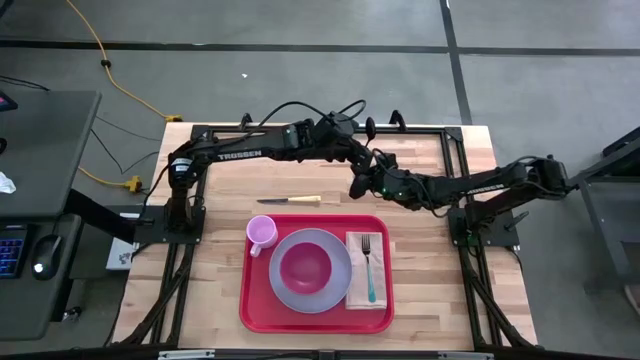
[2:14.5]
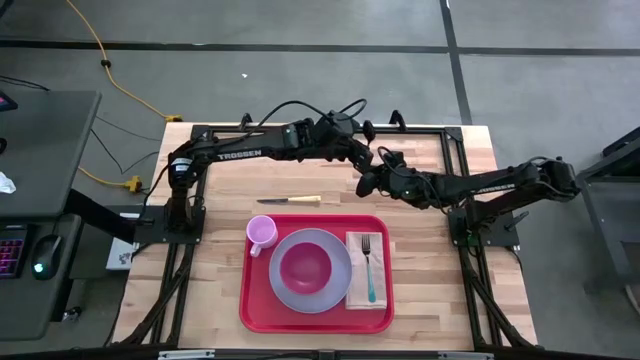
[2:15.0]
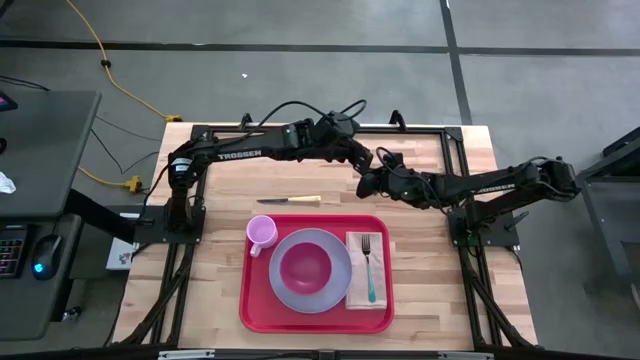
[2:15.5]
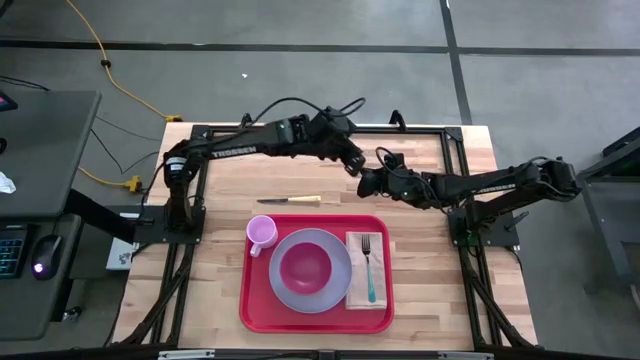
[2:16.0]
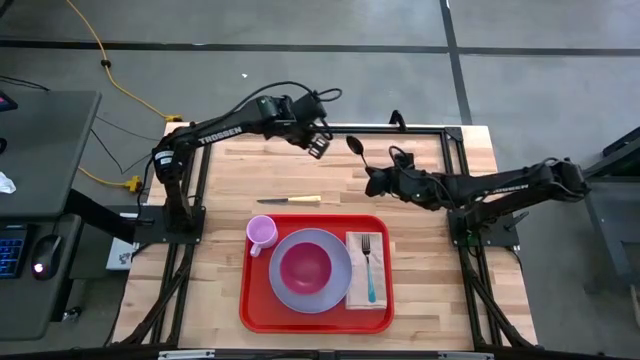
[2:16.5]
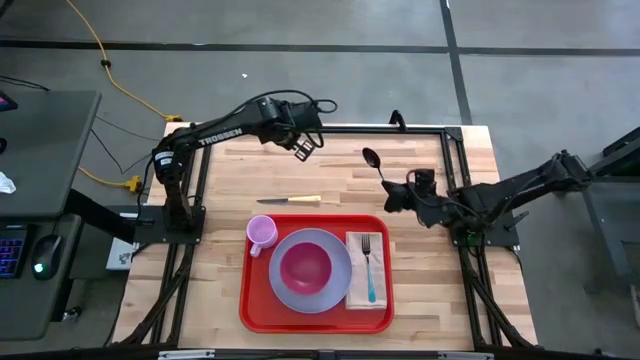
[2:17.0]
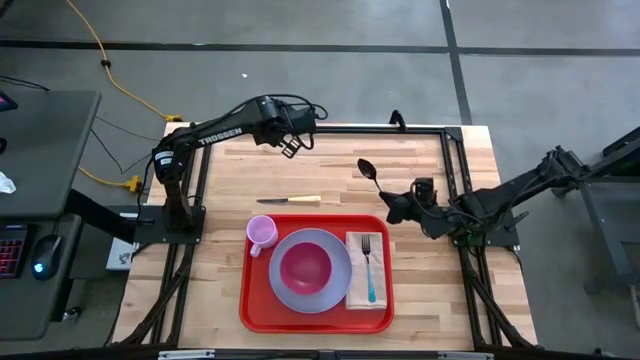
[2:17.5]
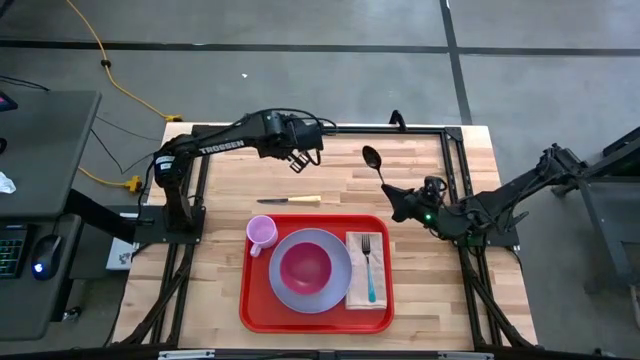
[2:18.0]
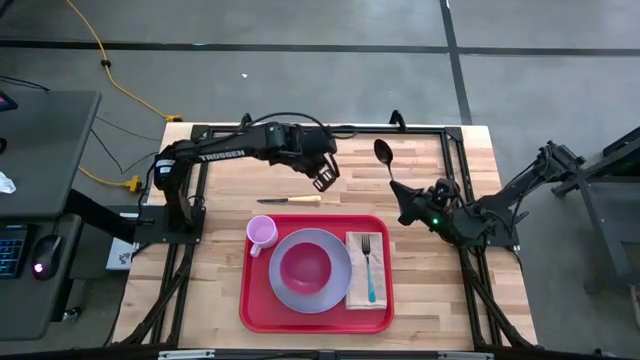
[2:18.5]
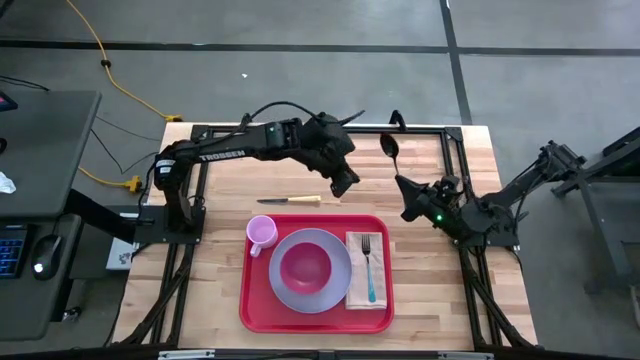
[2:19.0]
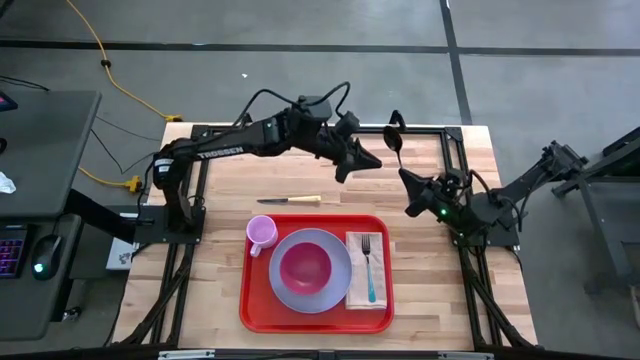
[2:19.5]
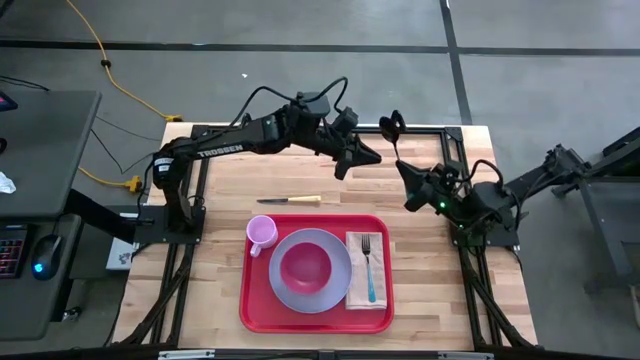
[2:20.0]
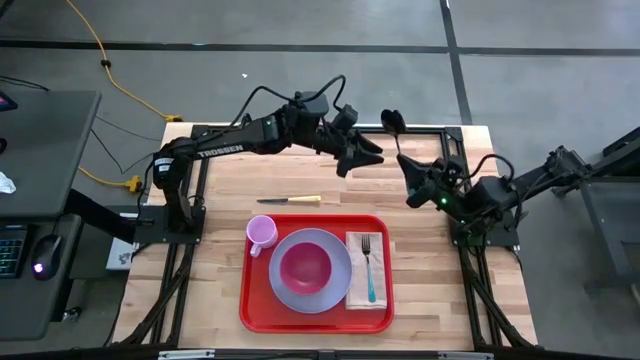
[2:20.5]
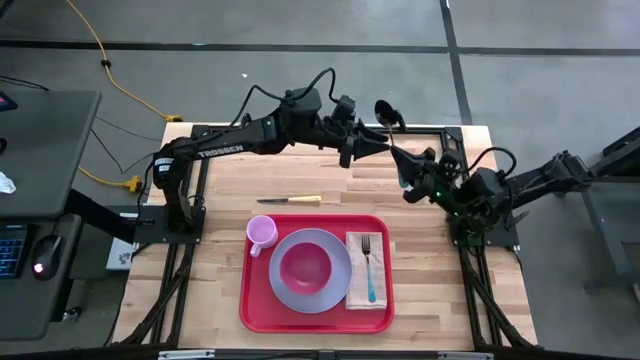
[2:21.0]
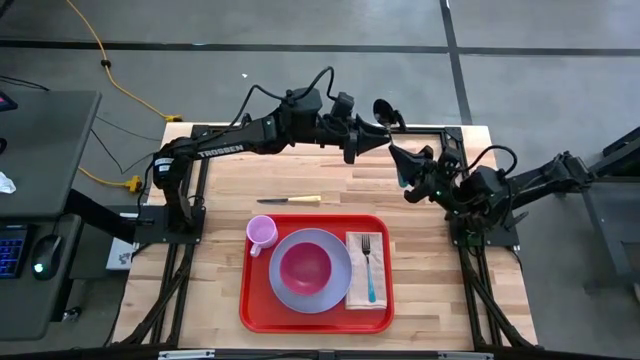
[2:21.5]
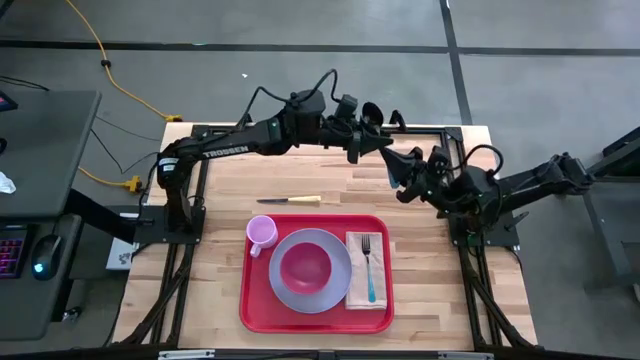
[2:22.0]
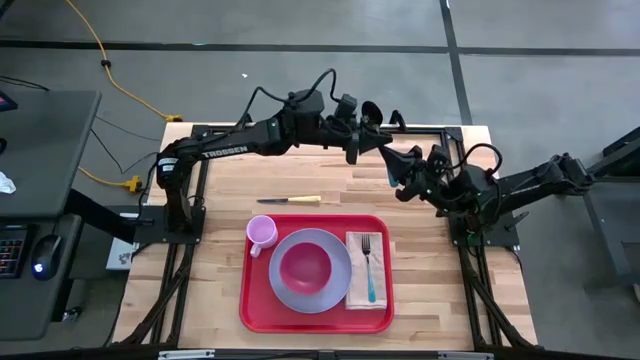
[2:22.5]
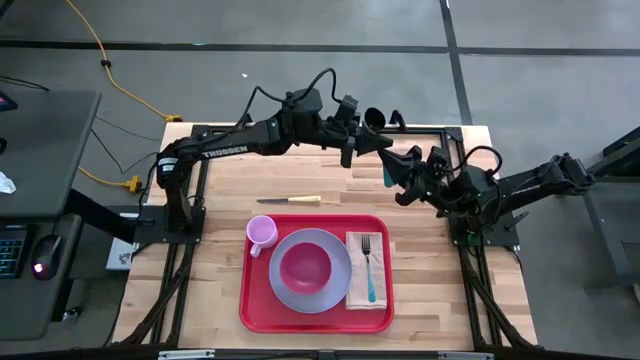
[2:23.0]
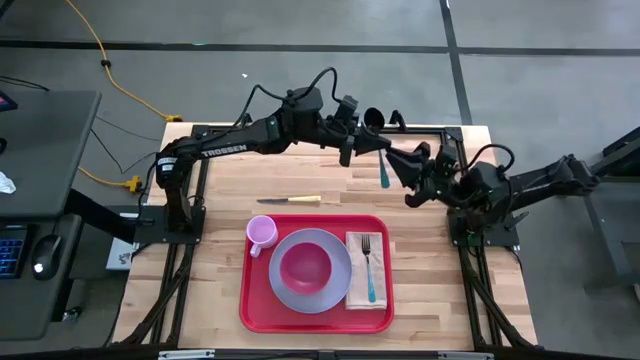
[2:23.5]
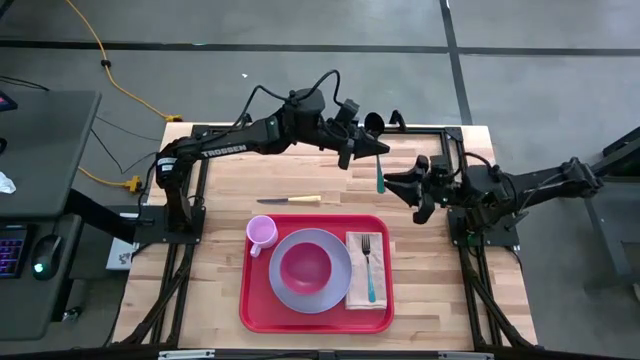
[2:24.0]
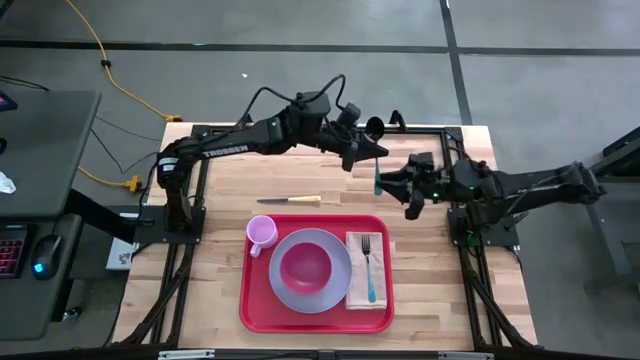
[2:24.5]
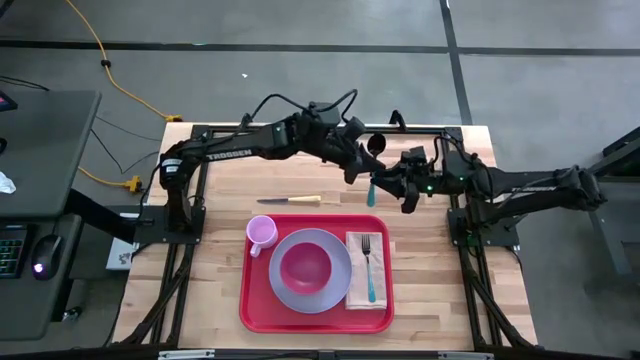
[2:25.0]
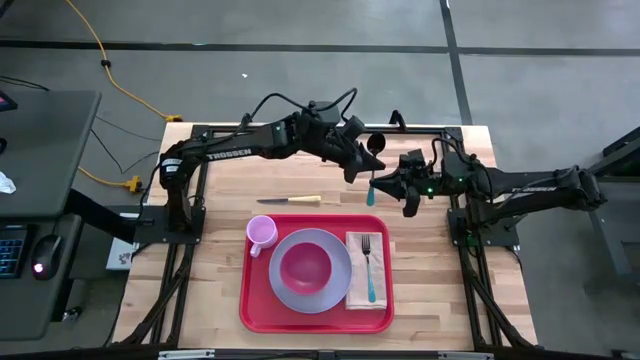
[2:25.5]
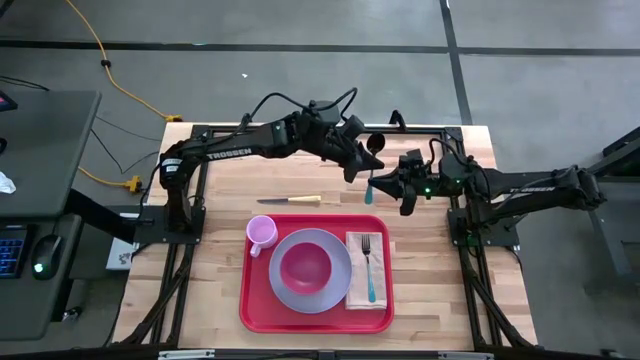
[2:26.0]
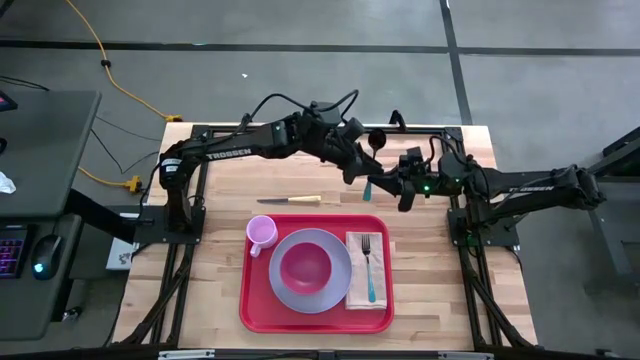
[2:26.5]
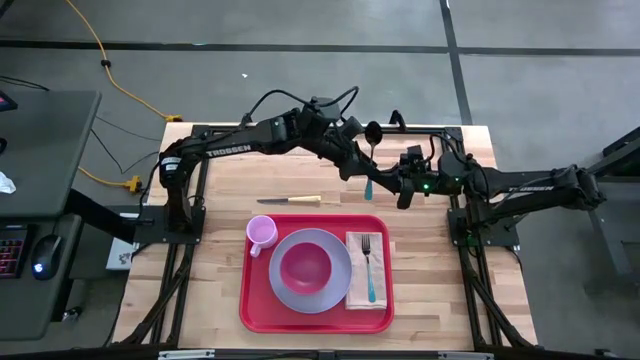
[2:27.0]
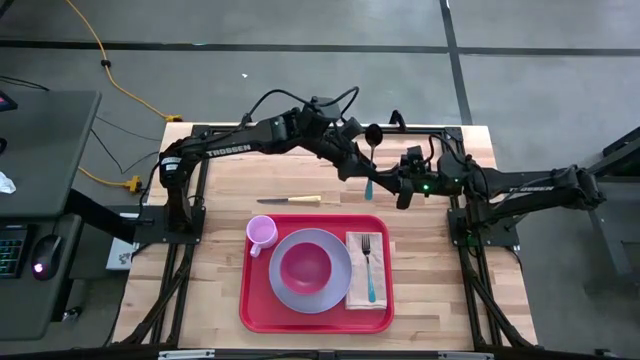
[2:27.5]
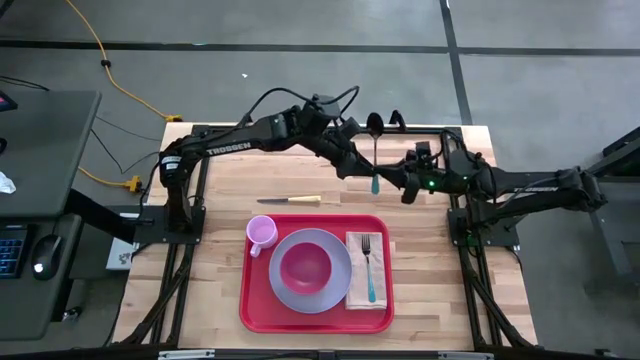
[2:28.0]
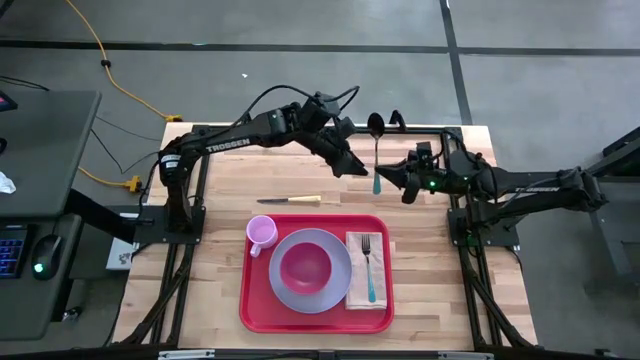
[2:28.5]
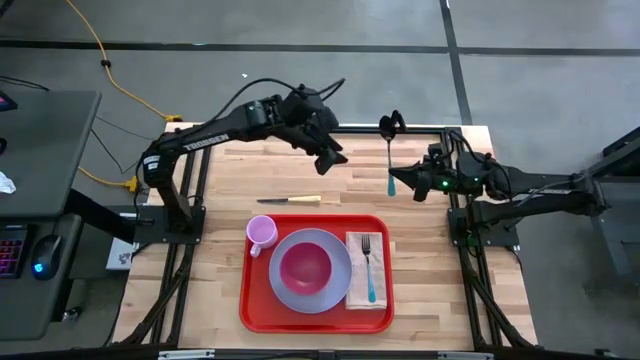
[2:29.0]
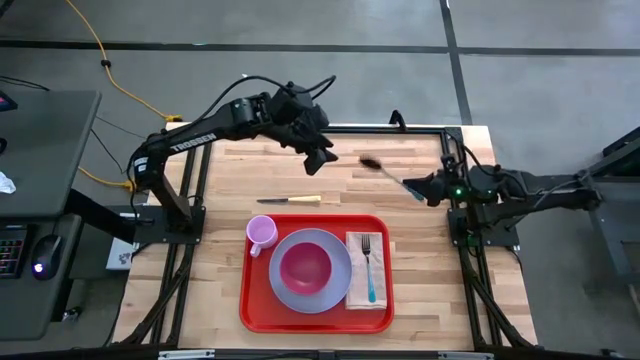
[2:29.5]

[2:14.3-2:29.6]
Task: Set up tray
Put the blue spoon on the brown napkin to the left of the blue fork

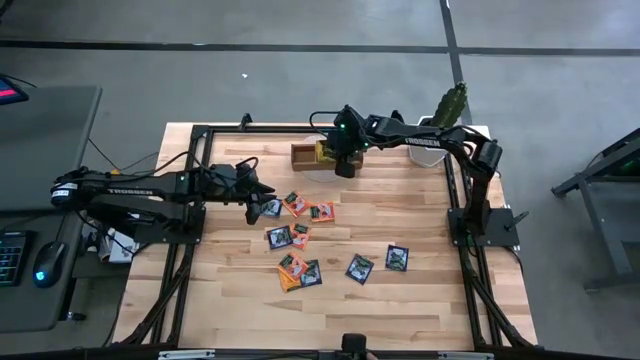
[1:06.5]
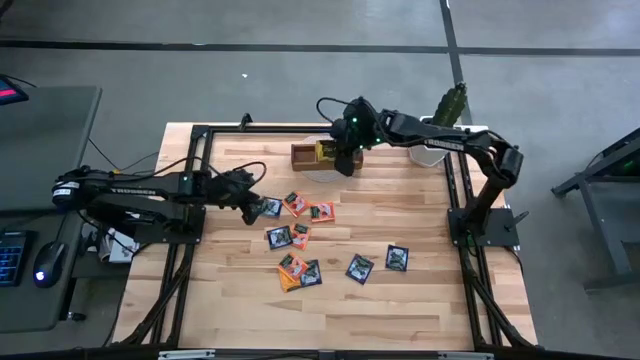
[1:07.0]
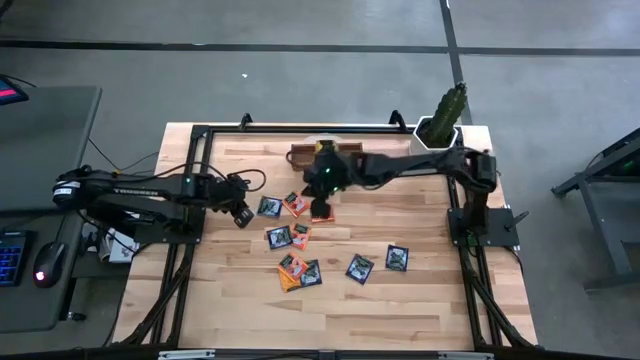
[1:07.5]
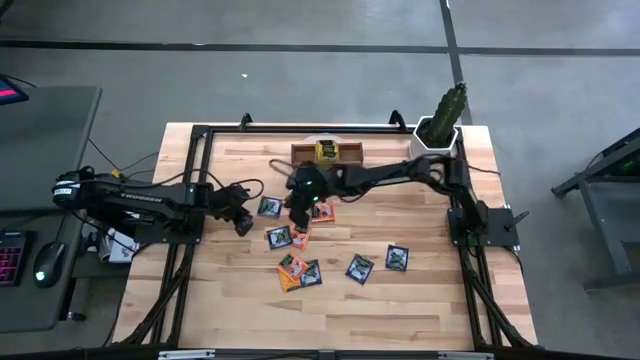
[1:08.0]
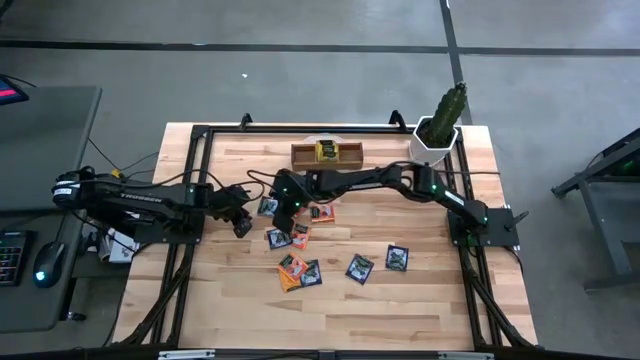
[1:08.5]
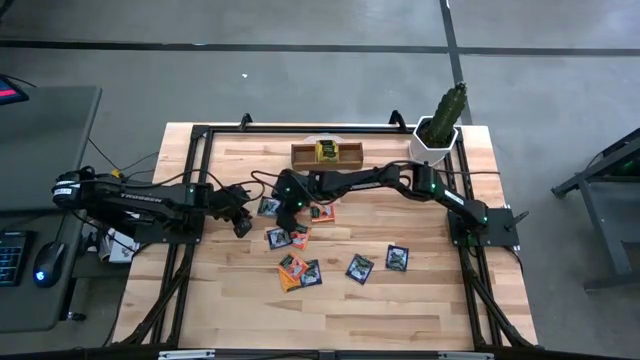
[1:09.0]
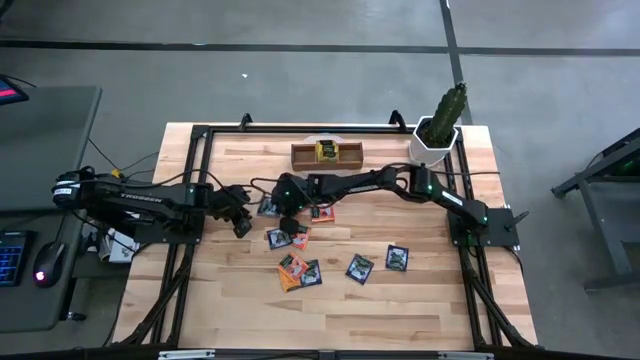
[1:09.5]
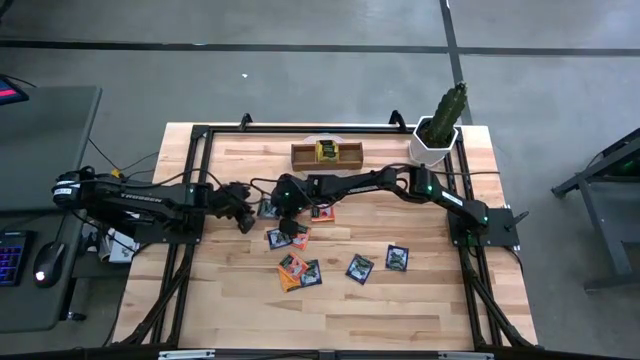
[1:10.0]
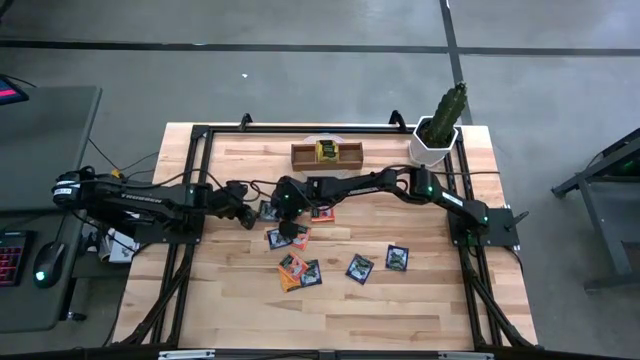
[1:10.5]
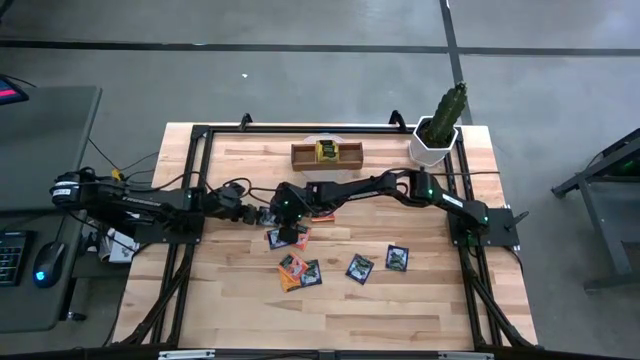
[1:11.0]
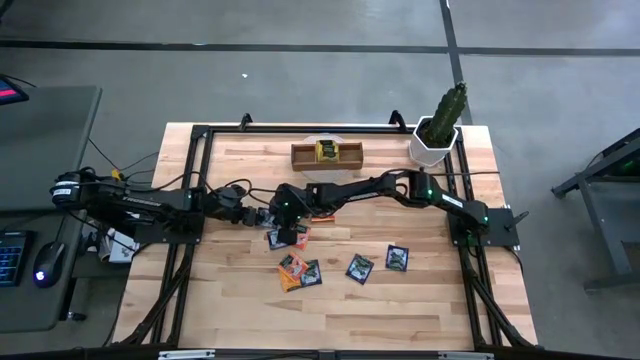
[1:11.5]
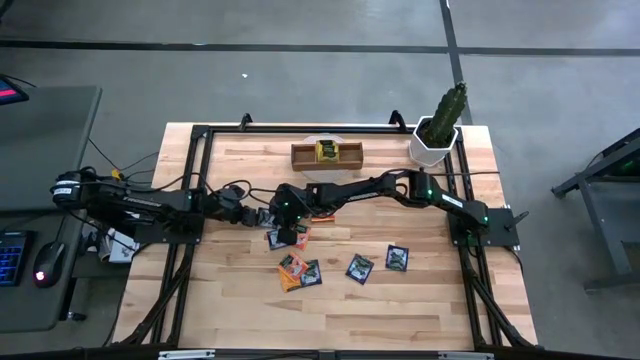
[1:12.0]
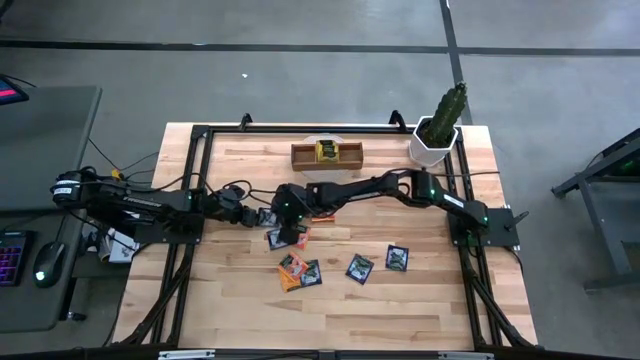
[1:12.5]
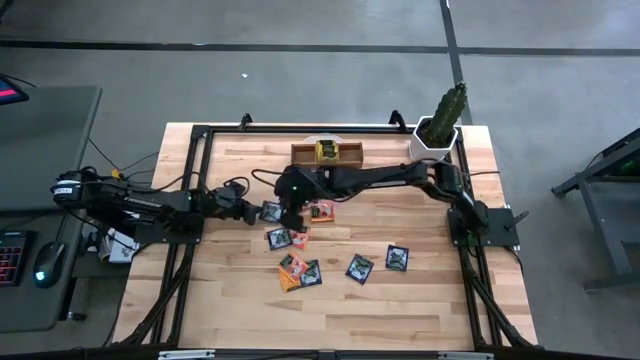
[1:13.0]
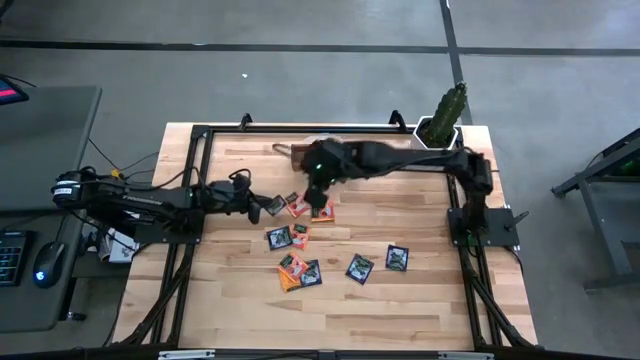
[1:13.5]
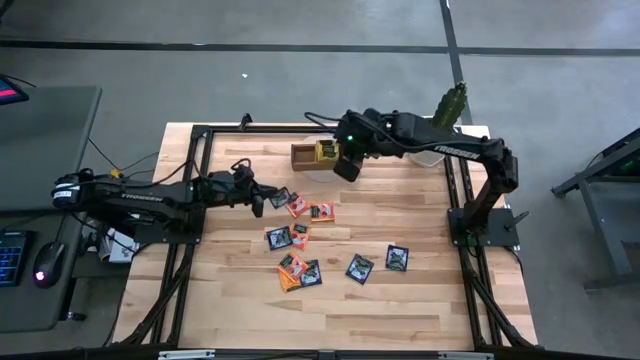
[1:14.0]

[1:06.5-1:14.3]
Task: Pick & Place Tea
Put the purple tea bag in the left compartment of the organizer
